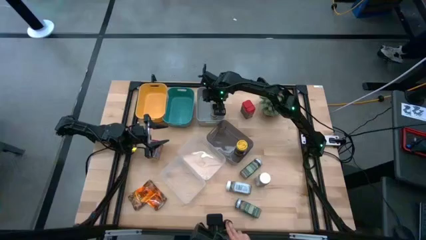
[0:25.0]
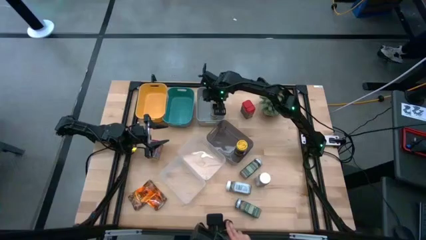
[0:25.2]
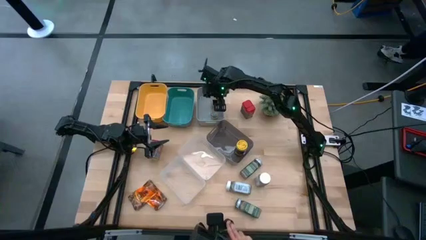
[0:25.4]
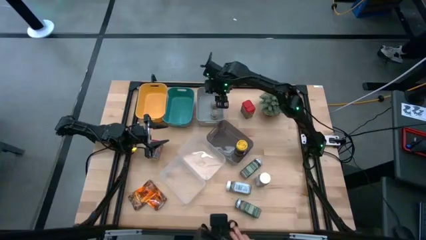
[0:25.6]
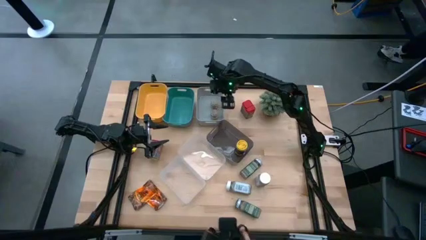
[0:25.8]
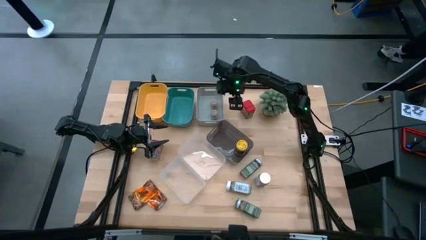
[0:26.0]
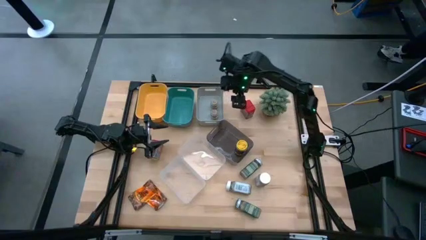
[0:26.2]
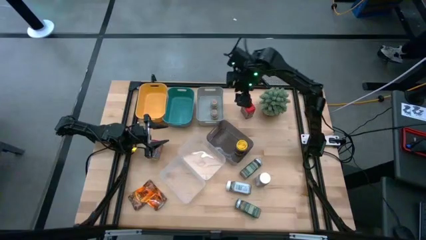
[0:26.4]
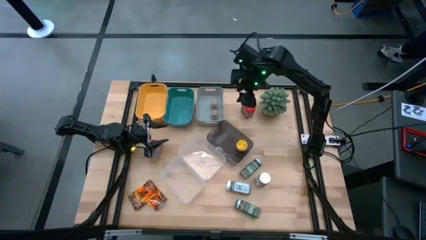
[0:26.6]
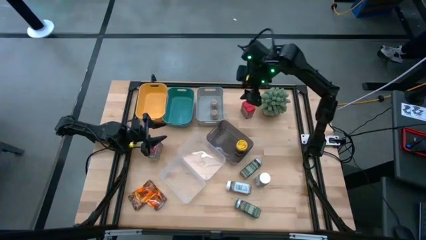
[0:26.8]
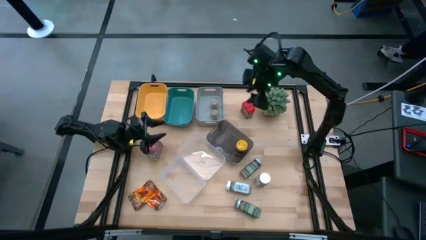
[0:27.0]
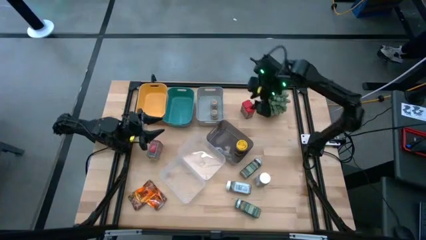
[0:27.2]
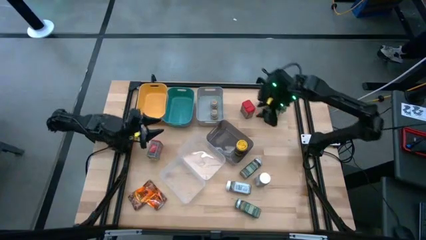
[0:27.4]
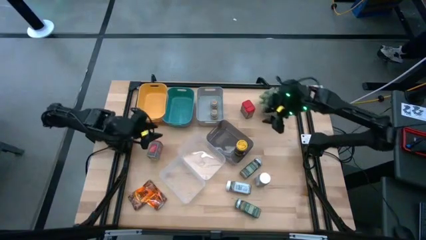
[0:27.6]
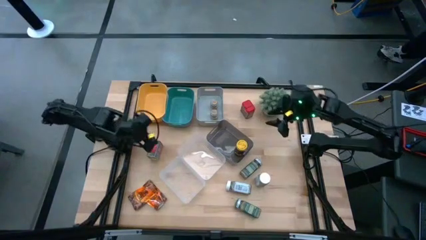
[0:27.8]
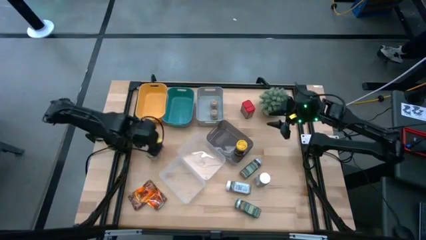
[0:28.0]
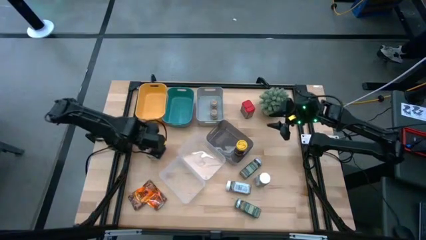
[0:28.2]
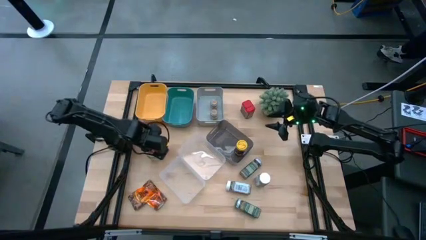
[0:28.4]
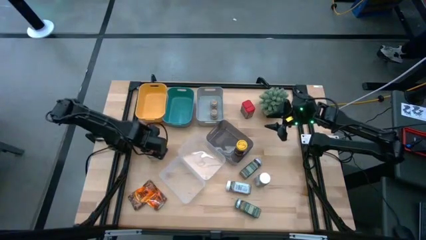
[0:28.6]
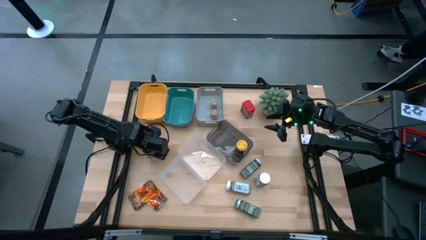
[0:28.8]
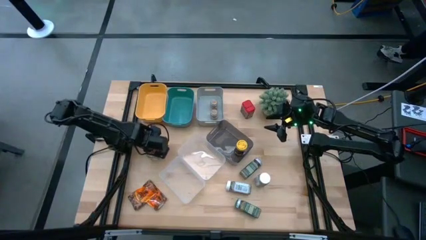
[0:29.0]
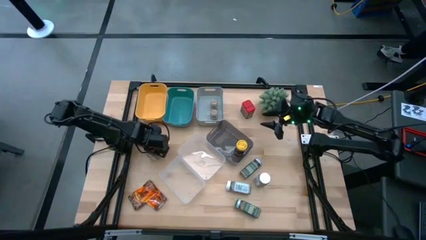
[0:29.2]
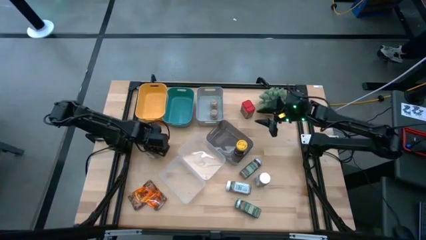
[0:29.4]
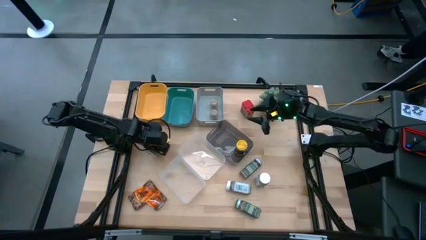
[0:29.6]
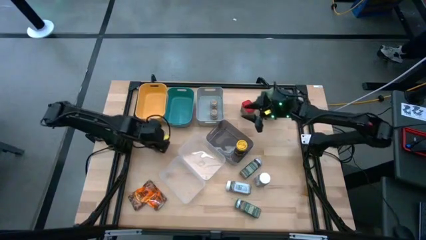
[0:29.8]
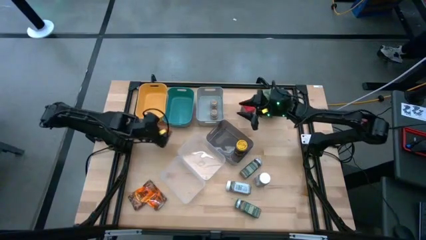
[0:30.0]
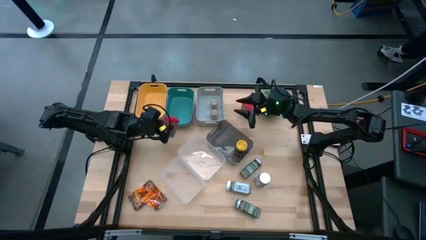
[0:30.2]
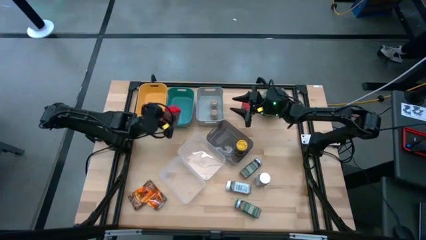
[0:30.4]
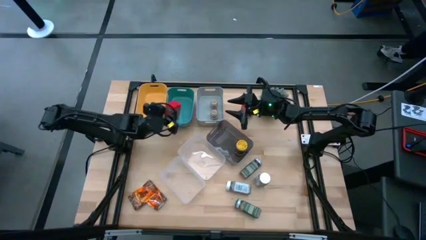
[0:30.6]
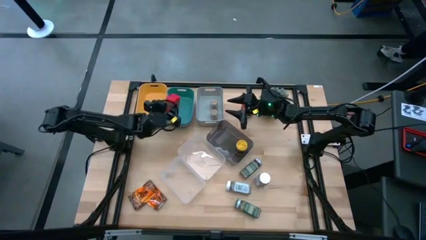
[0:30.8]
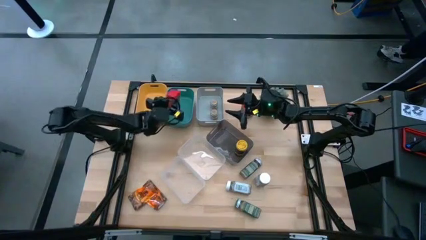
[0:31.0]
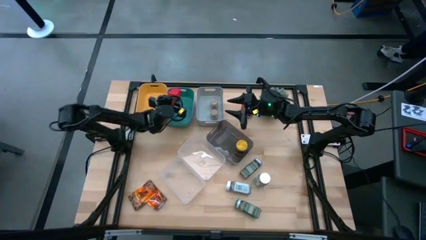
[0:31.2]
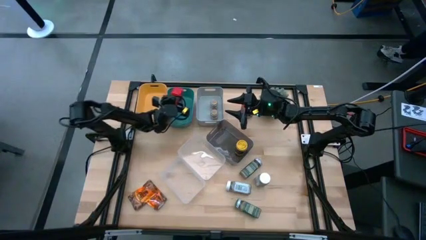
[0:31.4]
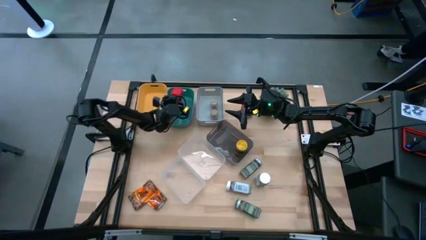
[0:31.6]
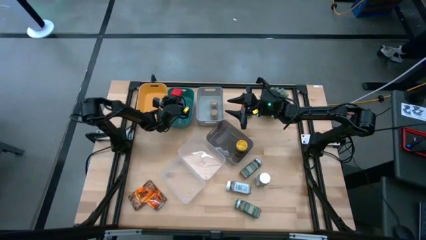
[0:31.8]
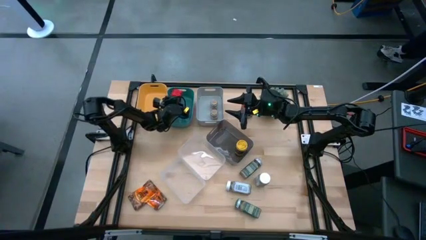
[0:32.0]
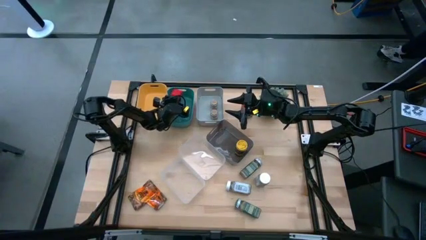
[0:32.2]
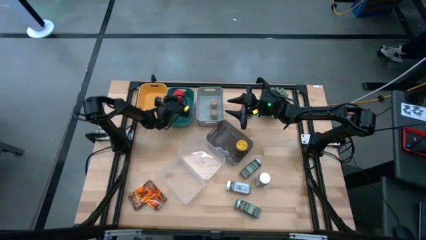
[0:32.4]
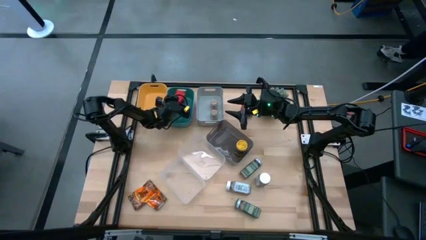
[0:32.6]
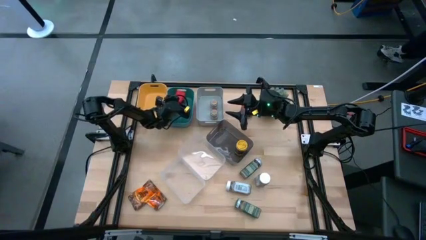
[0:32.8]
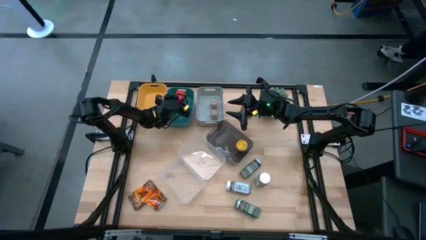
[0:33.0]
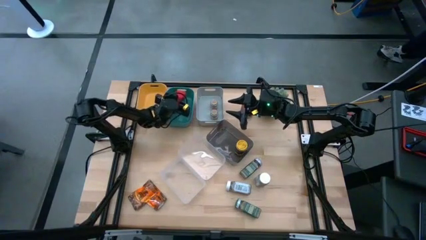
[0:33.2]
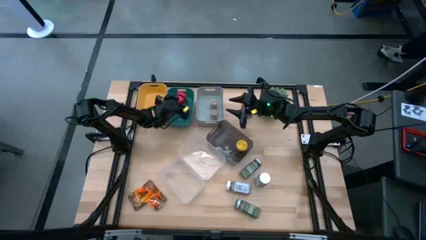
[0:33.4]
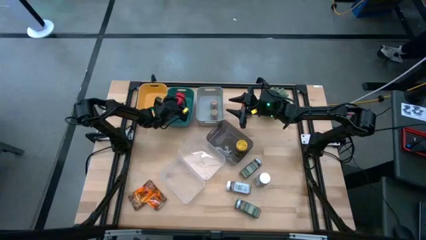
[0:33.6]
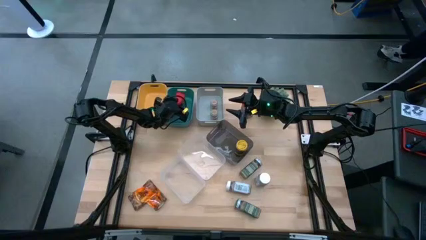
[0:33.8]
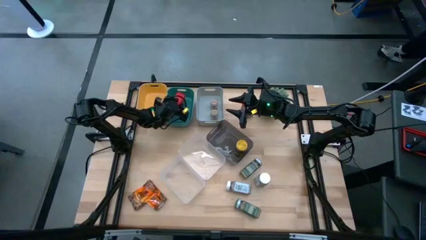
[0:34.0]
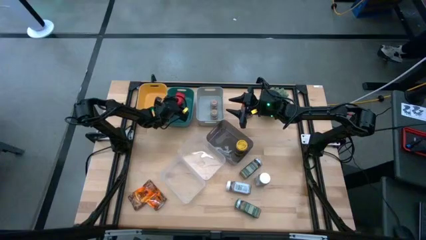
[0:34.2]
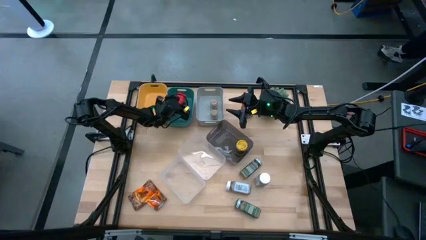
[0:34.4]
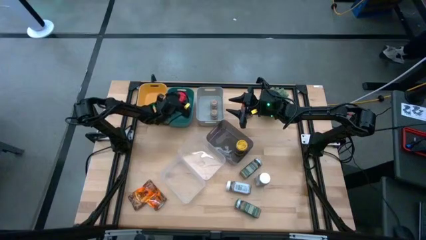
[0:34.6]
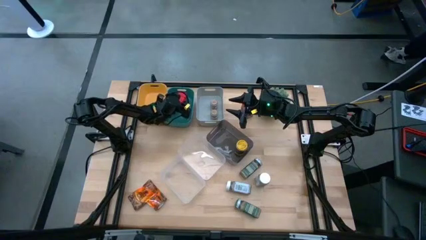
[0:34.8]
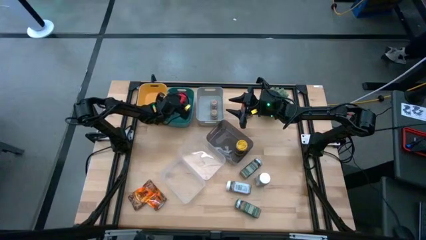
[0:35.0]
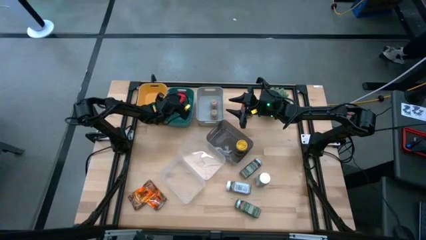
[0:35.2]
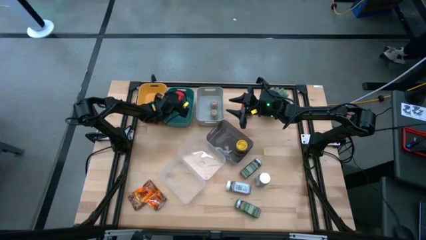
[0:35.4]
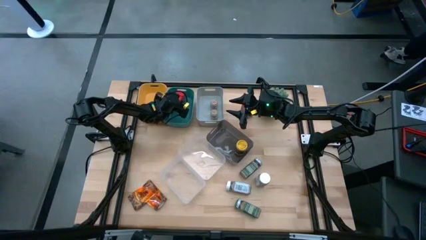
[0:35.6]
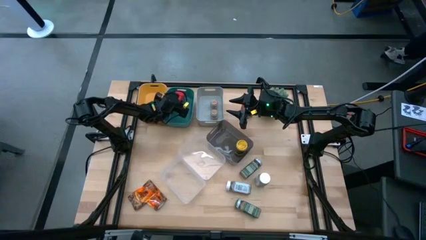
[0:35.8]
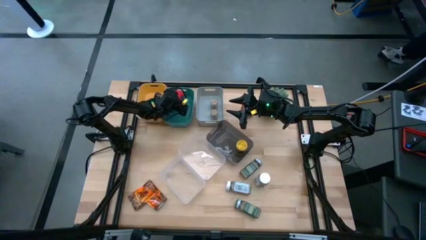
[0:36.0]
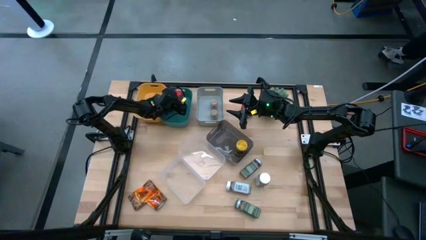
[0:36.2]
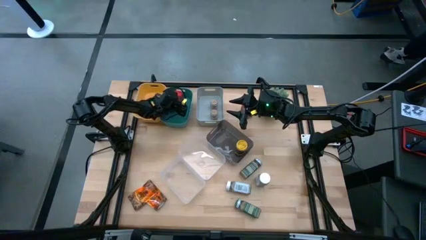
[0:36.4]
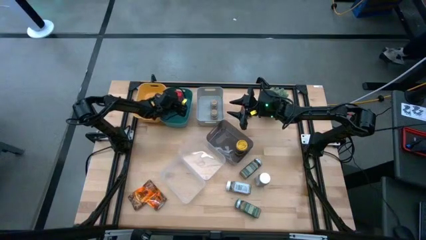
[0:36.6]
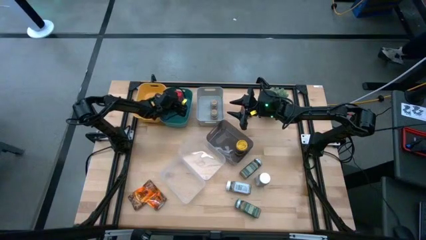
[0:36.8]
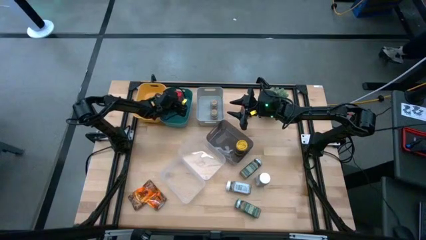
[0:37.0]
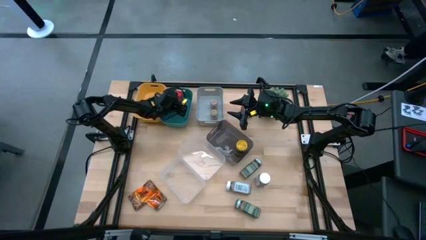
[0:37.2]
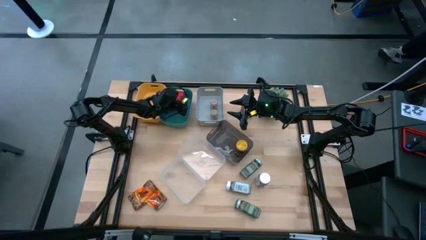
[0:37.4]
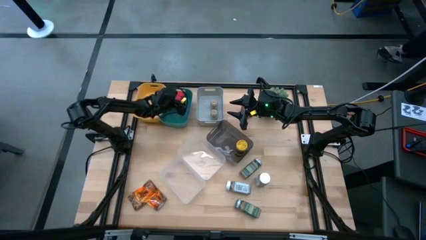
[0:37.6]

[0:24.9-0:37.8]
Task: Sort spices by type
Put the red seasoning can into the green bin
